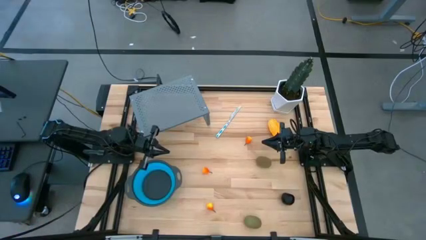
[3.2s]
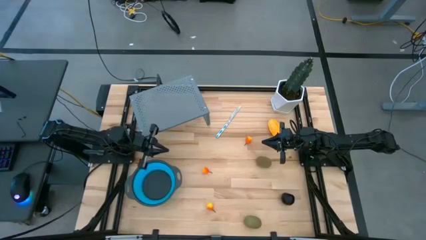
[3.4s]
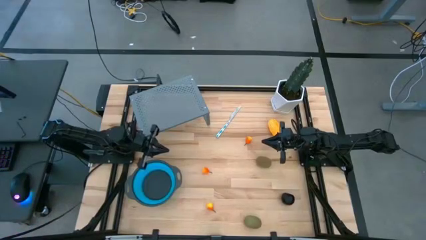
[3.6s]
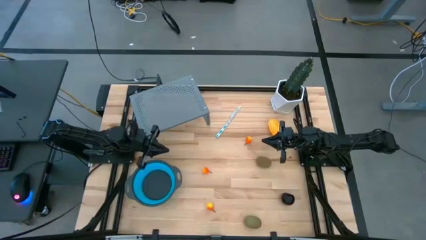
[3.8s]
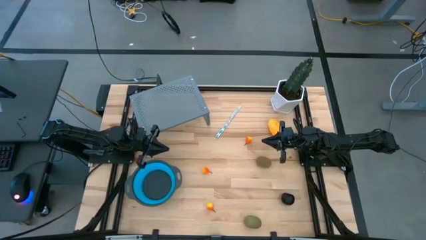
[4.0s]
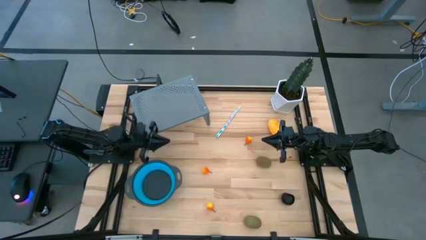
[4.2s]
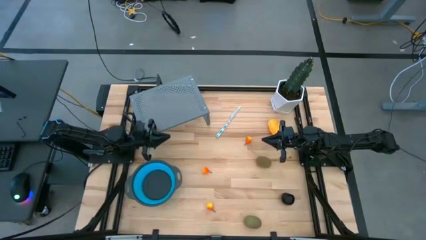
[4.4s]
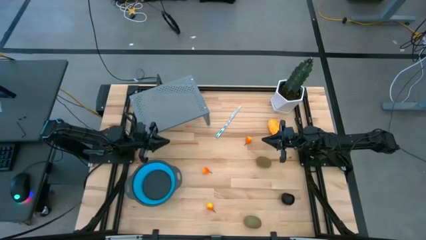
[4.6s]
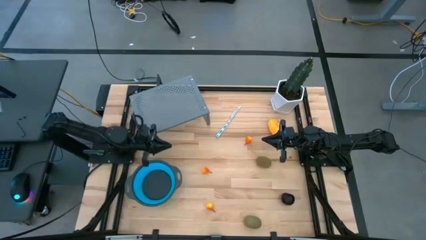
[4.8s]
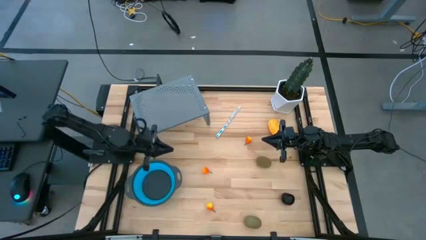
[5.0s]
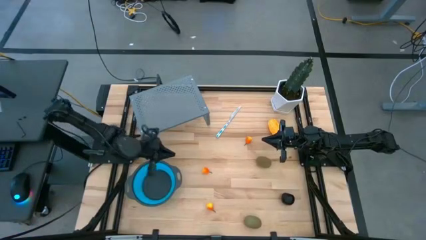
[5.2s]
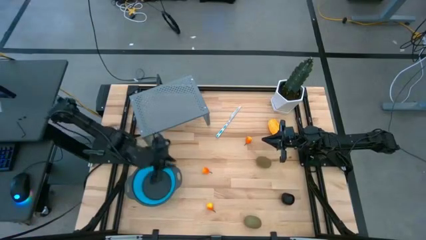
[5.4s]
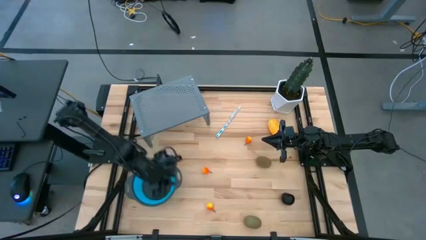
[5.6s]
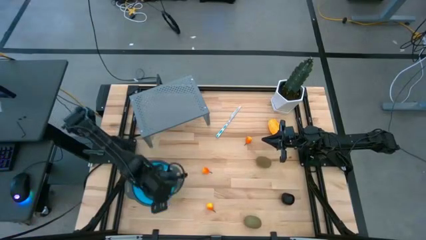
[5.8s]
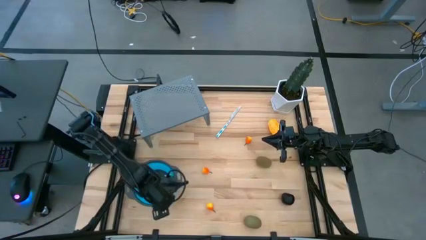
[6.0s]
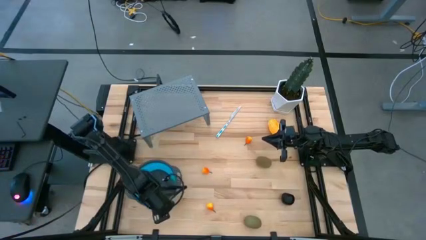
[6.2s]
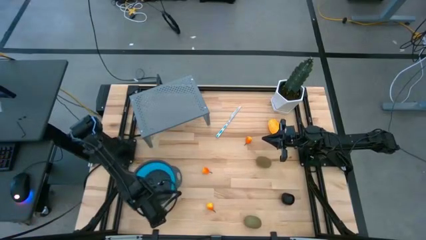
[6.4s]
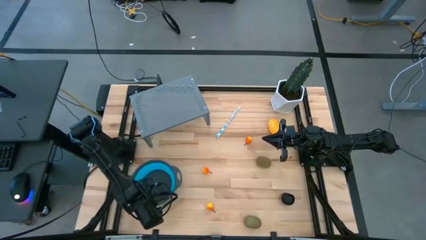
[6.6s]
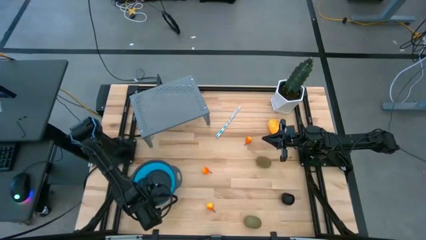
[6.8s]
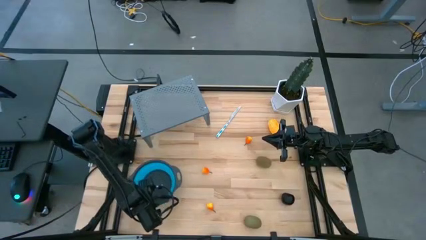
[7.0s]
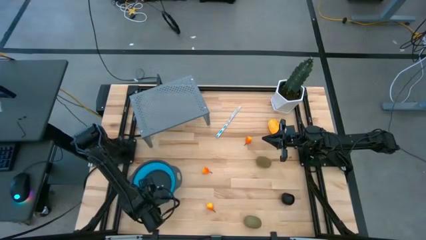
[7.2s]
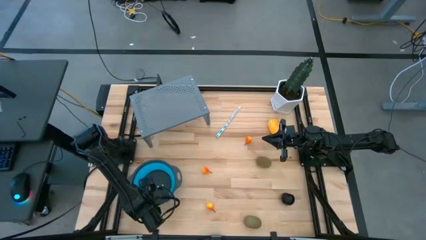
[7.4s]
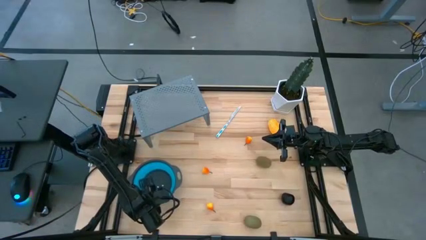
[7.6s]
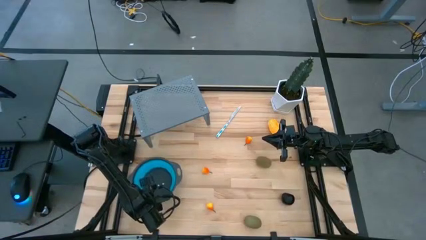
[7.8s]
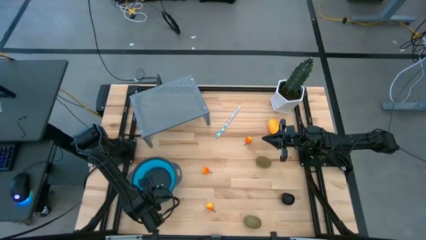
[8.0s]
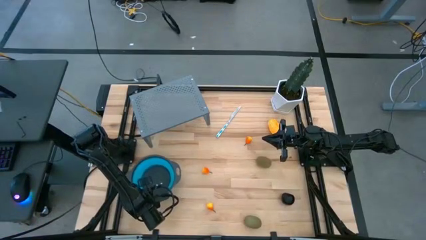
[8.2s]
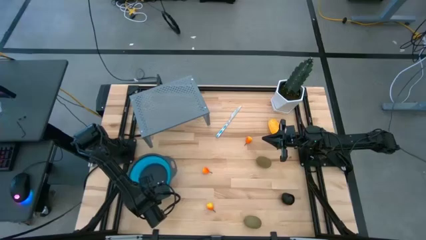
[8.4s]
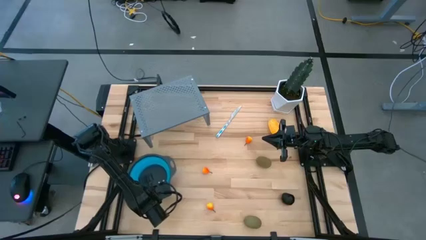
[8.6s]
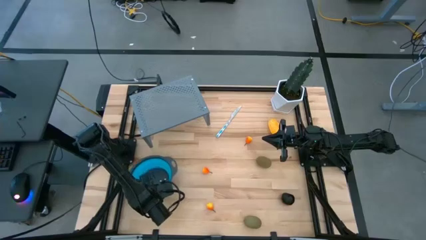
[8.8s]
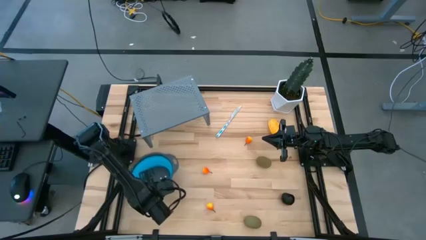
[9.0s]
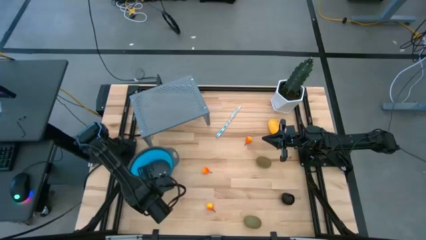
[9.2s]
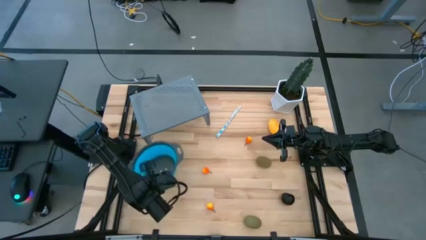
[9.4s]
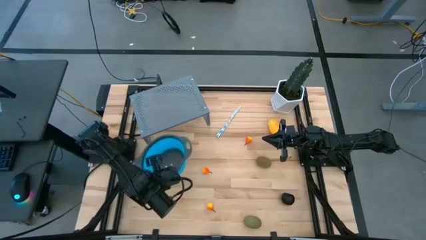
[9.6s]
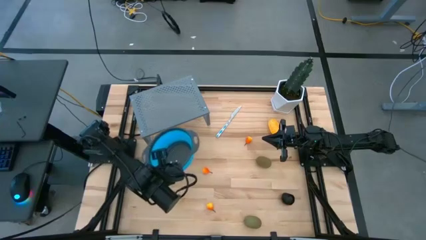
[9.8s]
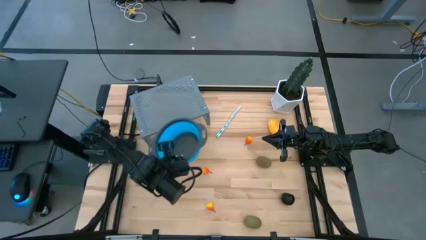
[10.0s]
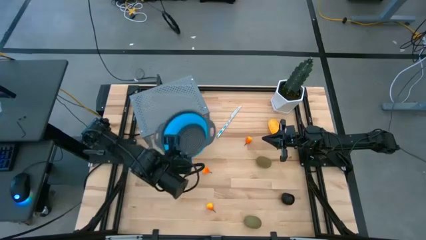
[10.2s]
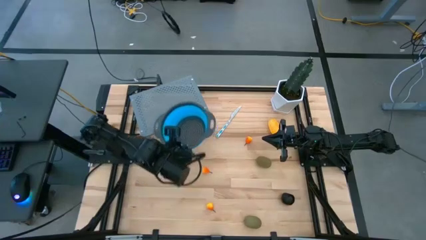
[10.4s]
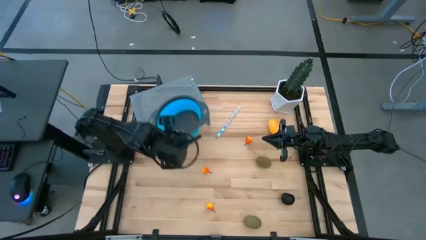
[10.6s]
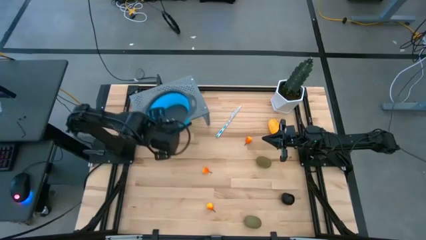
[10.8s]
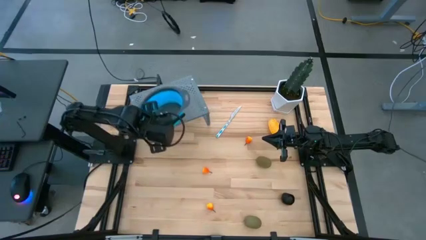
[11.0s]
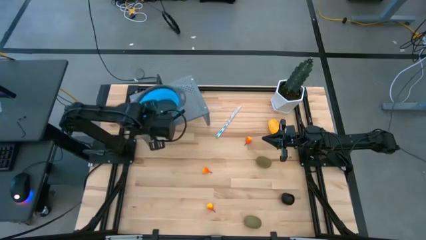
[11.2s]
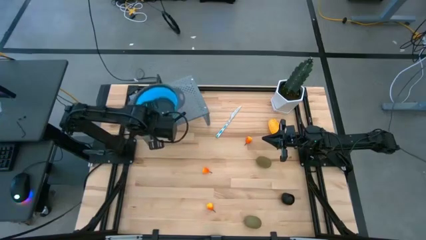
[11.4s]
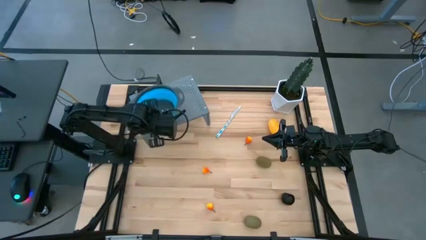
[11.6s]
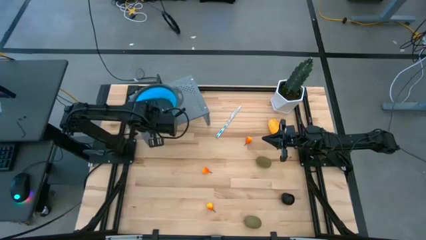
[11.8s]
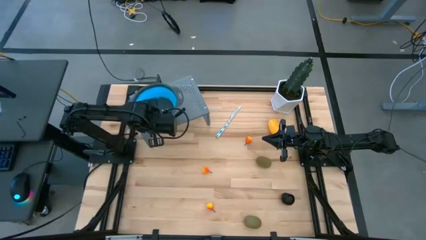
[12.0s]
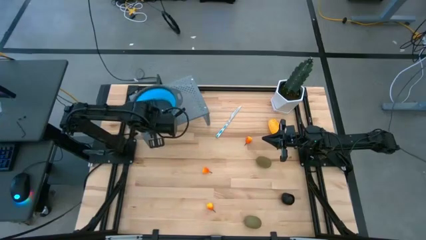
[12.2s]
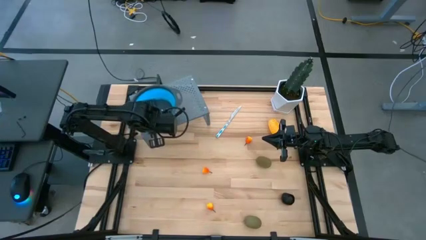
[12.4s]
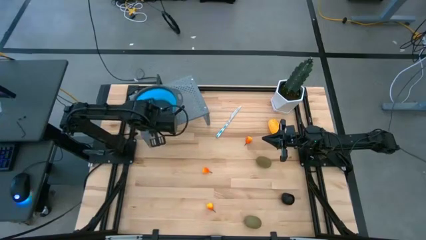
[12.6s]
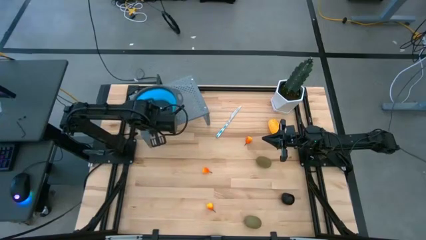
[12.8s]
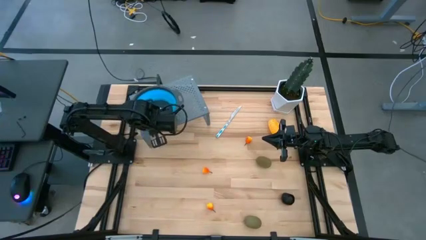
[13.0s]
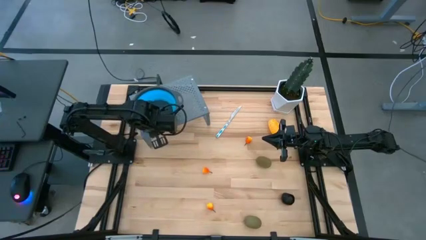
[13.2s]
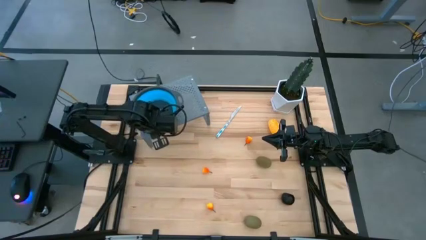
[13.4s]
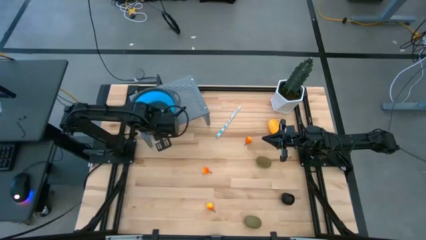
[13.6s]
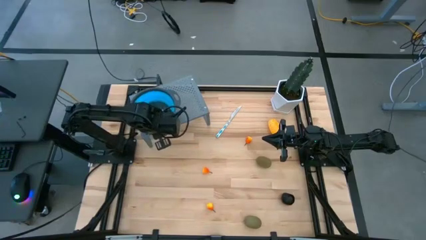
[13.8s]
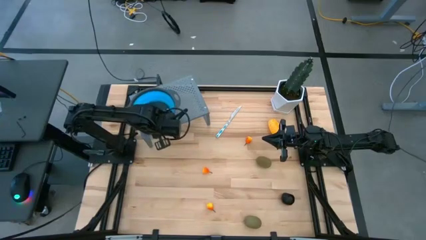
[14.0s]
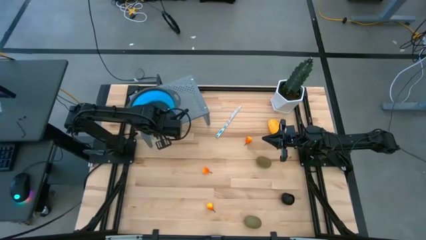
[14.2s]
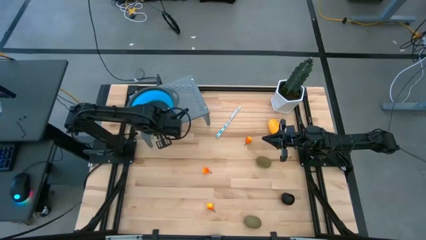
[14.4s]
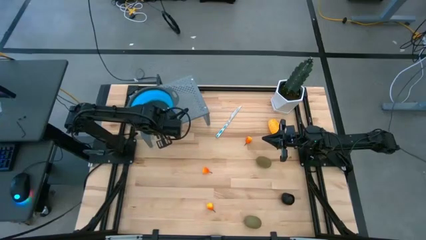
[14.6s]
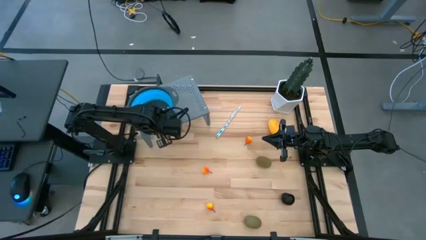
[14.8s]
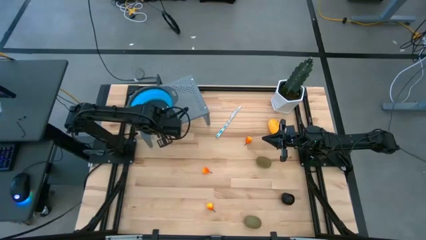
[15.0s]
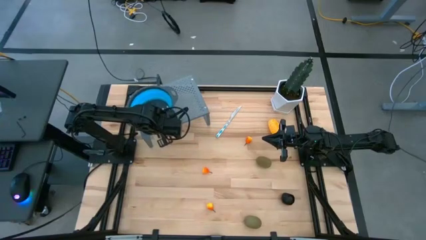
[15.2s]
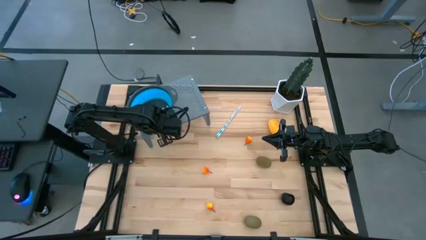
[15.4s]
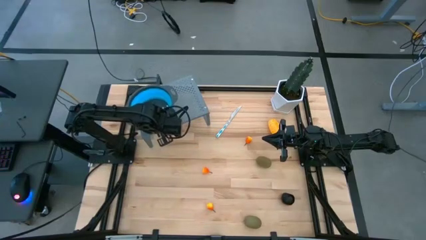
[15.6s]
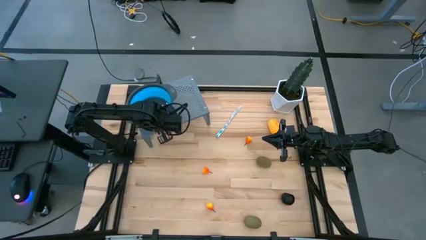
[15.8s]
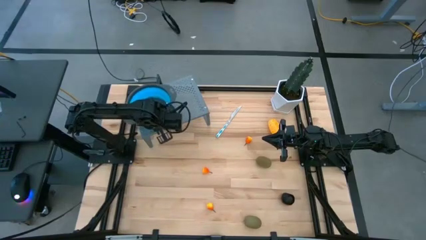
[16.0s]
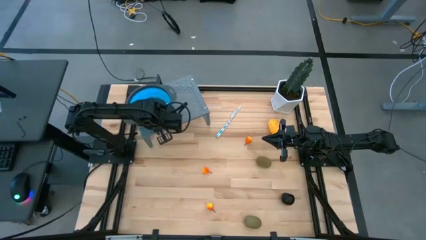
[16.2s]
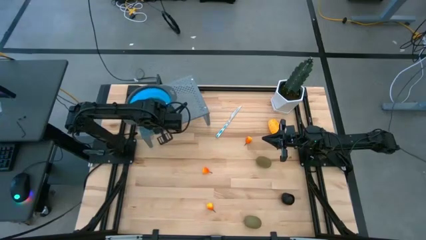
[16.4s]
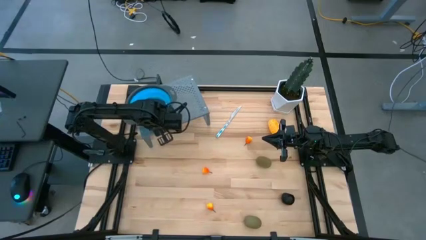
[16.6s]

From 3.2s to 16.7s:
Task: Pick & Place Fruit
Put the blue strainer bowl on the shelf
